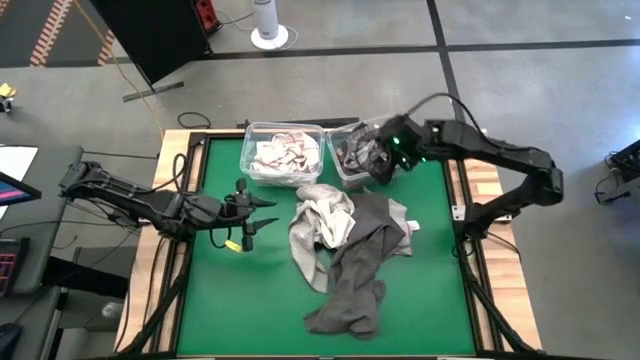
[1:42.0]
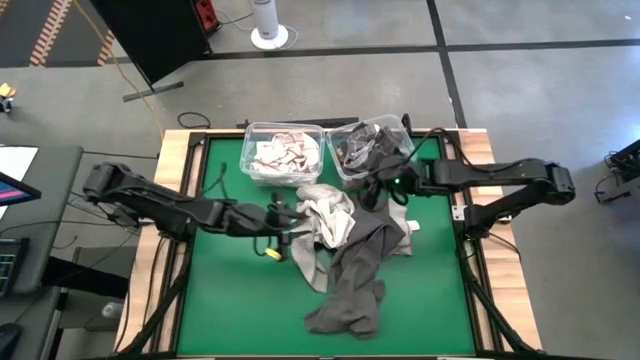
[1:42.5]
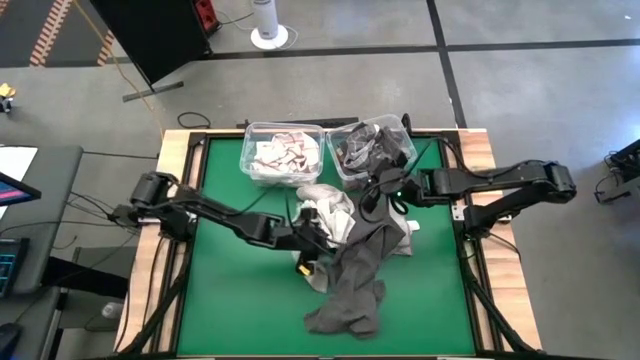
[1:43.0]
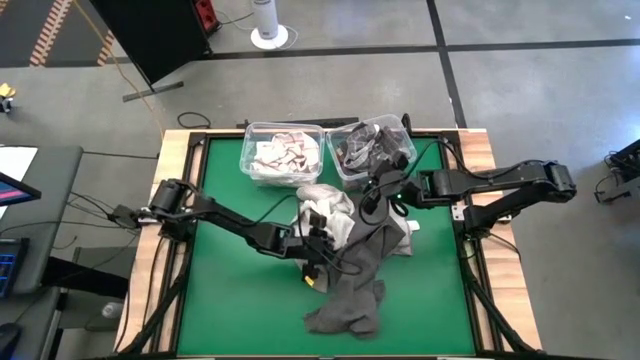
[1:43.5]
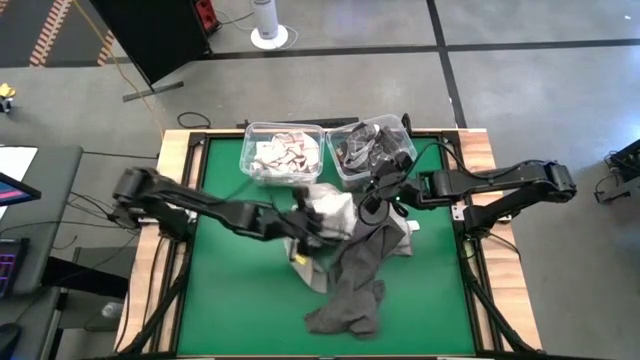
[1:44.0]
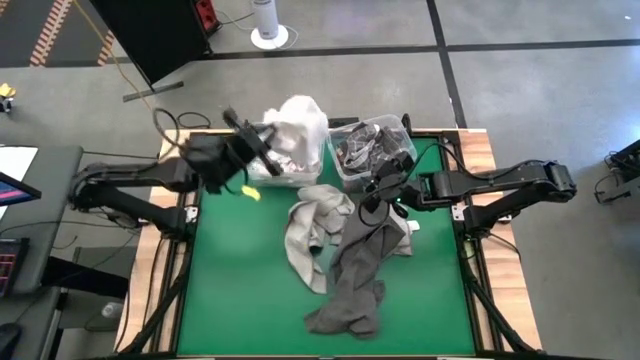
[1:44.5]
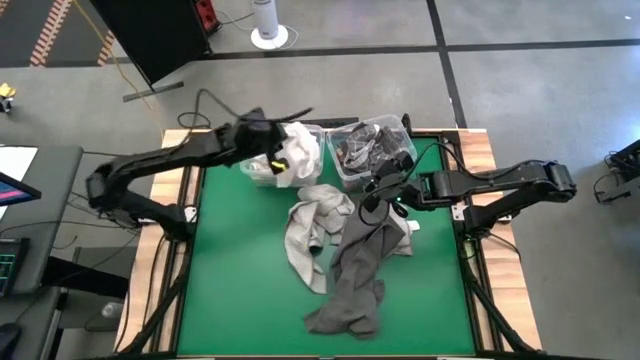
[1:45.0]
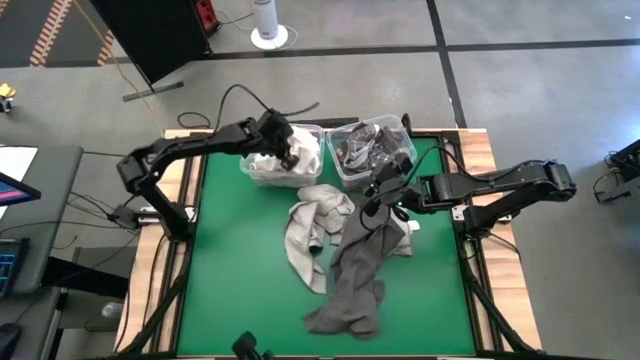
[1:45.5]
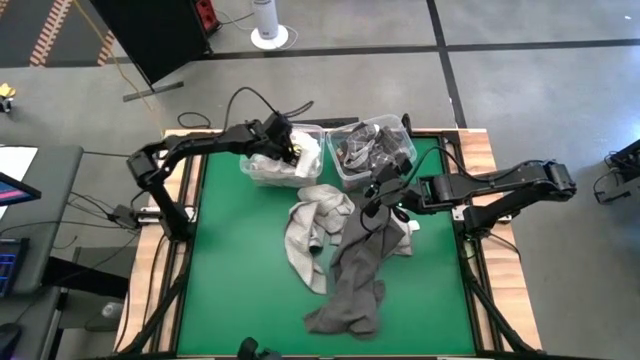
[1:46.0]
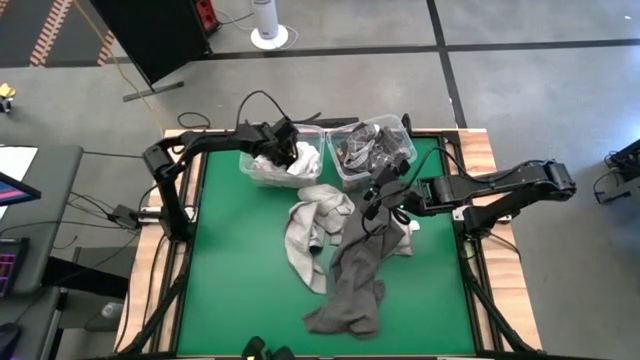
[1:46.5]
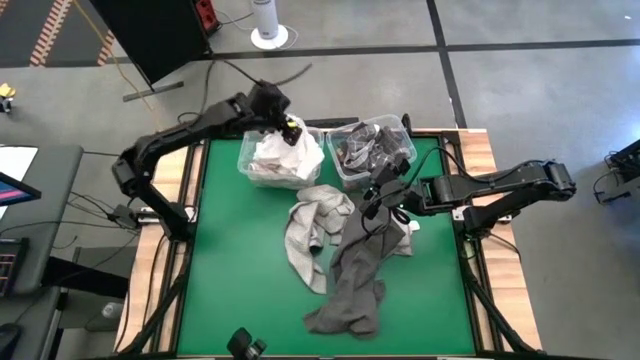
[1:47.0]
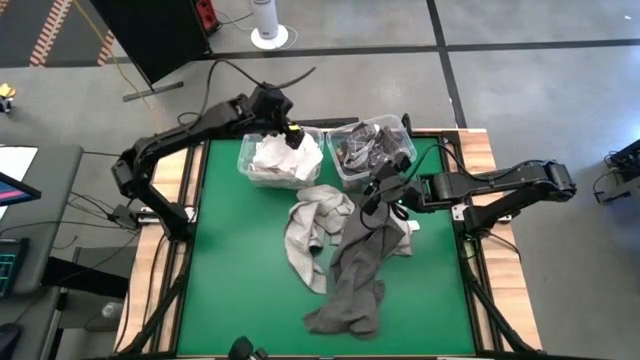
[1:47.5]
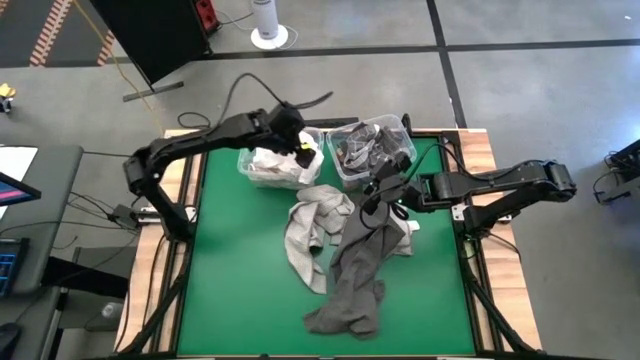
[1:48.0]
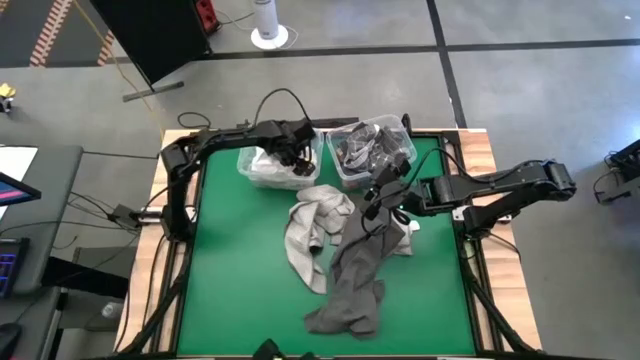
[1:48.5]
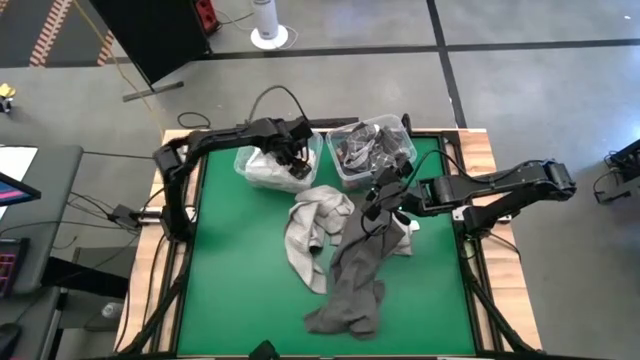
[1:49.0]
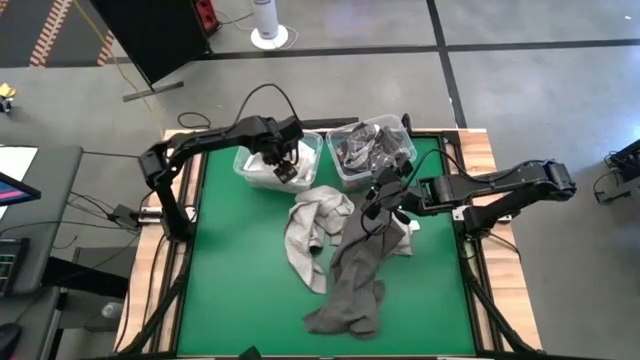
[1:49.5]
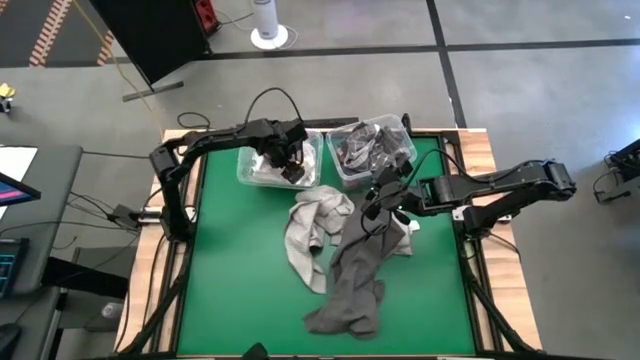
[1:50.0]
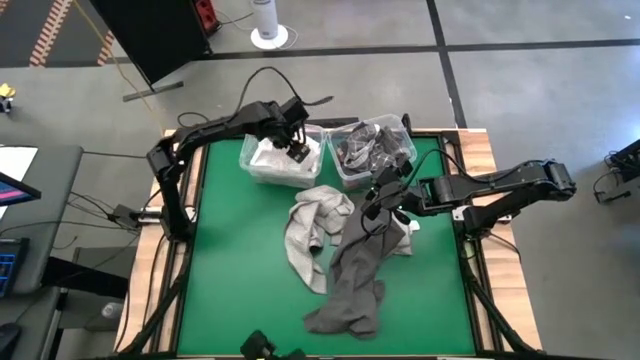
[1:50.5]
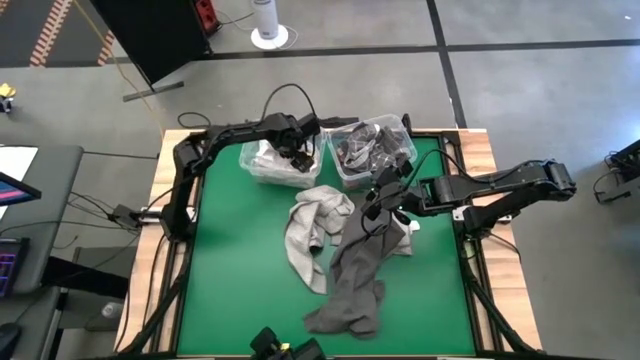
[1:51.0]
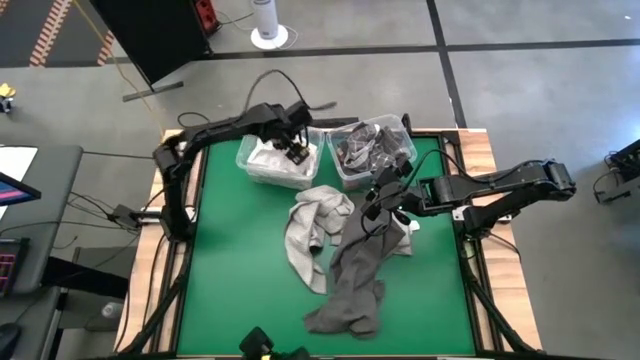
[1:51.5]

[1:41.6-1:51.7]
Task: Sort towels by color in basket
Put the white microfiber towel into the left transparent bin

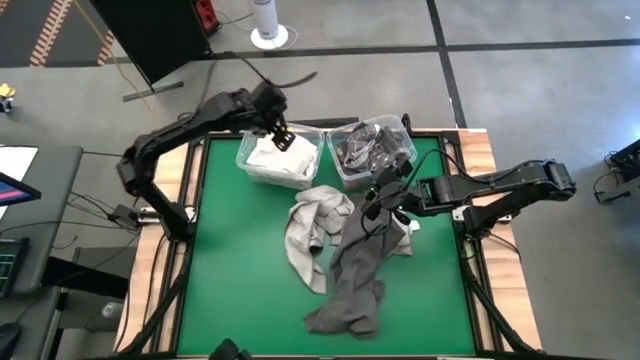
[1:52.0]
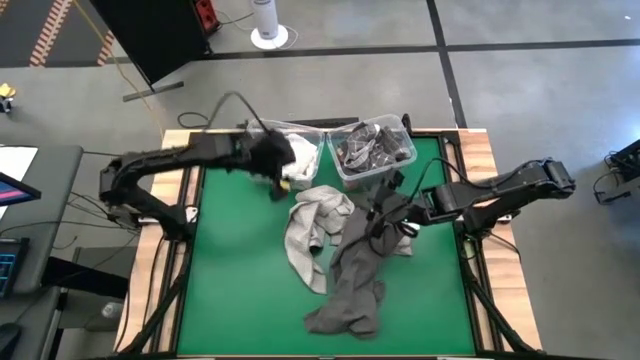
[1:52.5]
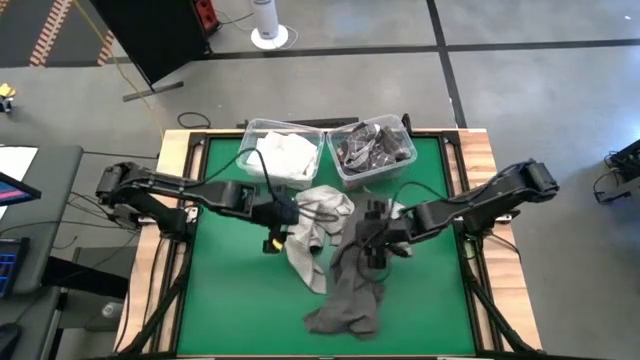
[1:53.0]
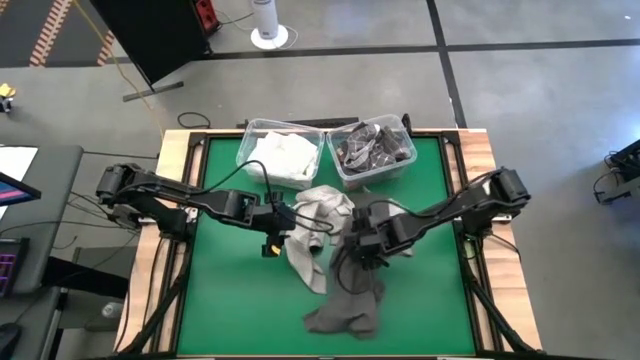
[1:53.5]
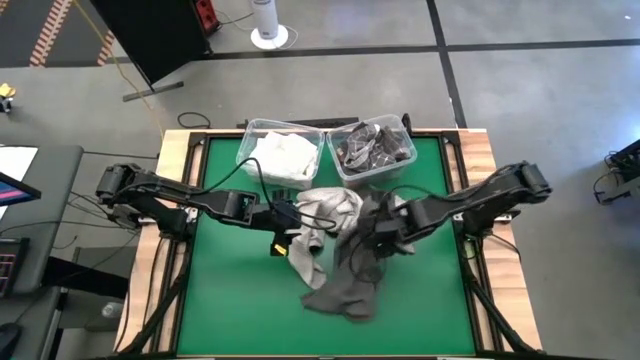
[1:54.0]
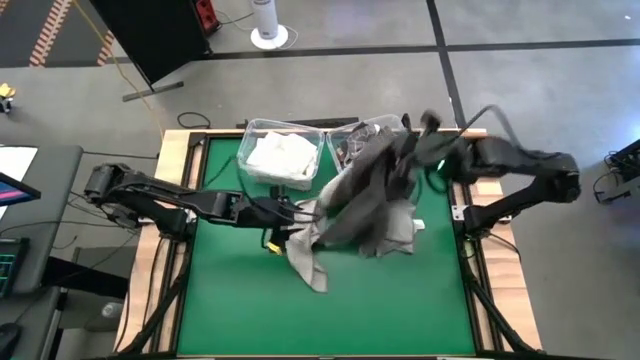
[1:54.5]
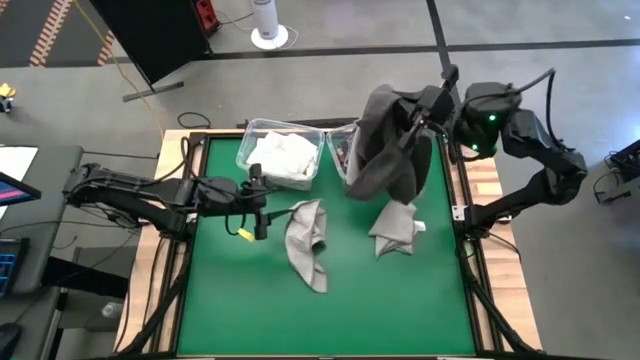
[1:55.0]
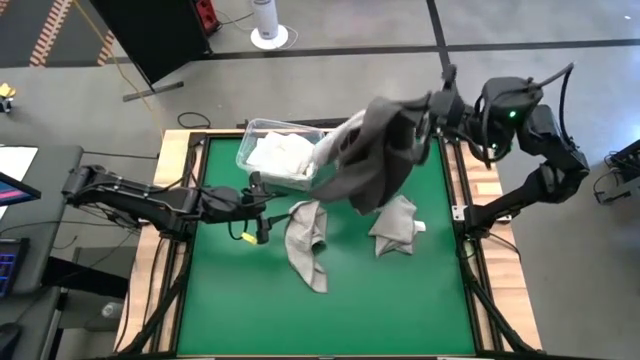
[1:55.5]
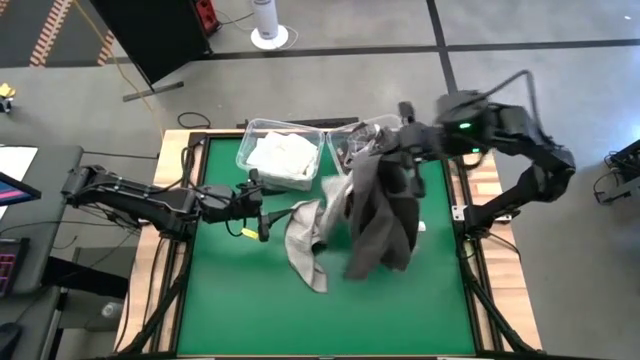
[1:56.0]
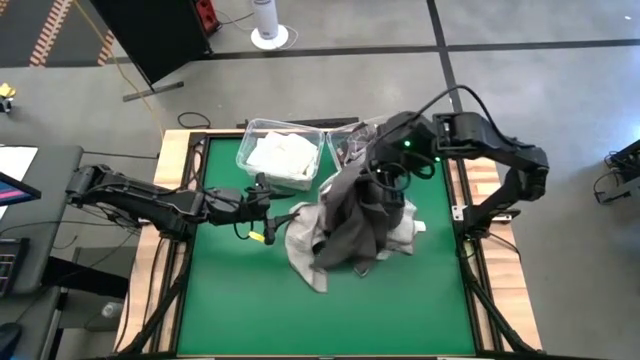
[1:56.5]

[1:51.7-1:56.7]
Put the black microfiber towel into the right transparent bin

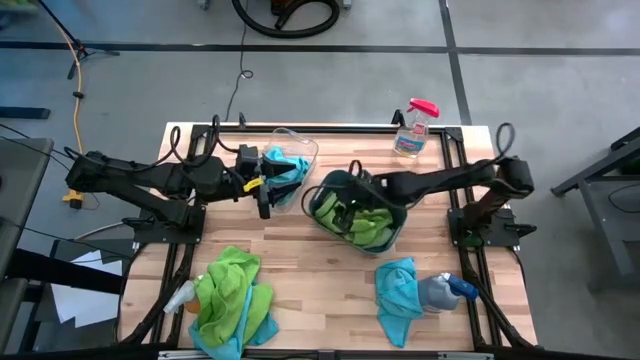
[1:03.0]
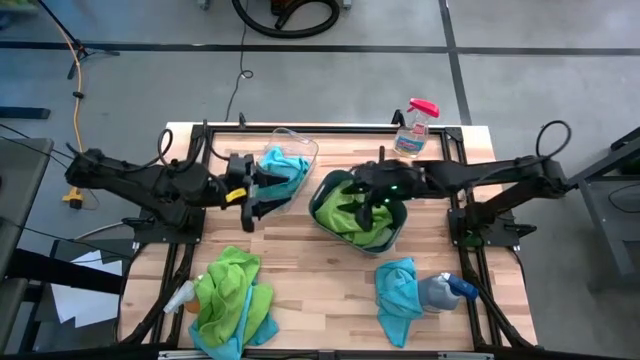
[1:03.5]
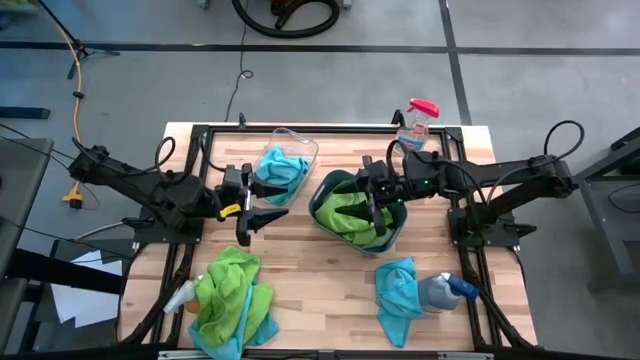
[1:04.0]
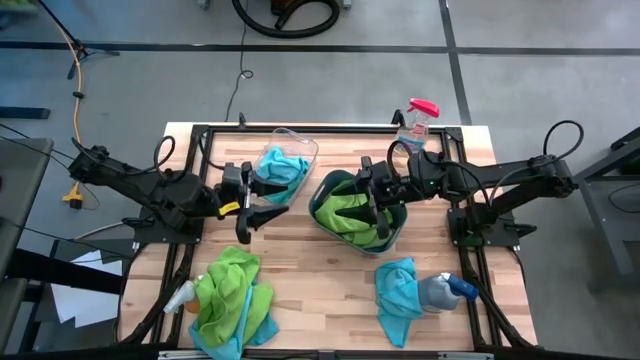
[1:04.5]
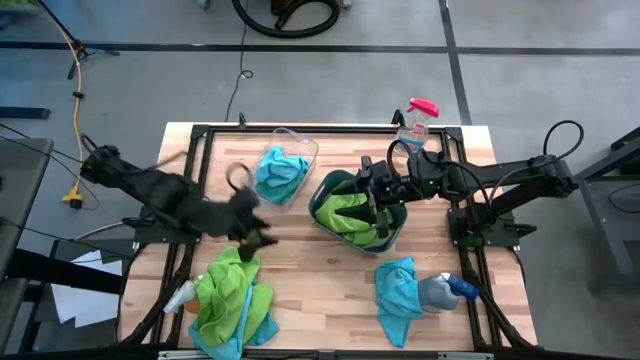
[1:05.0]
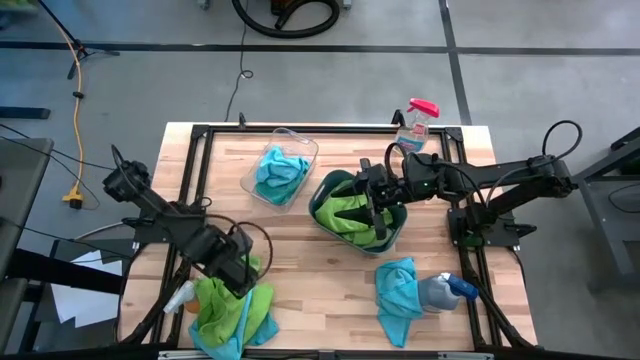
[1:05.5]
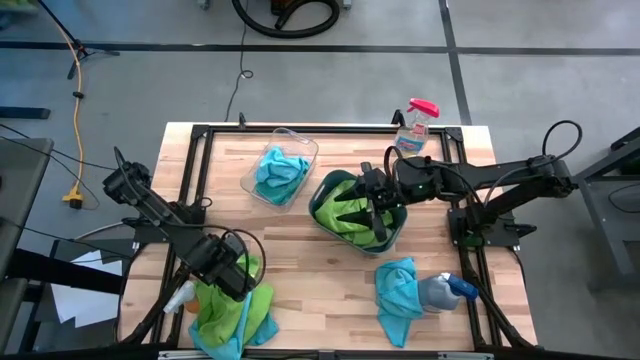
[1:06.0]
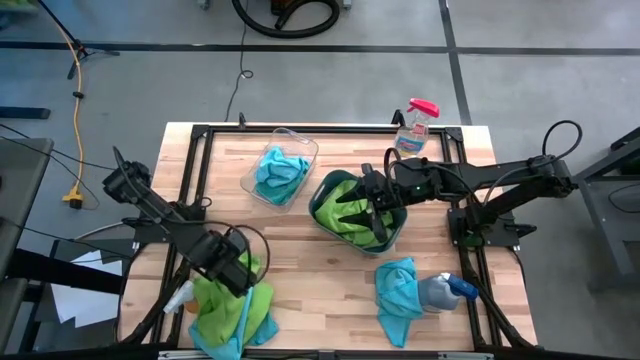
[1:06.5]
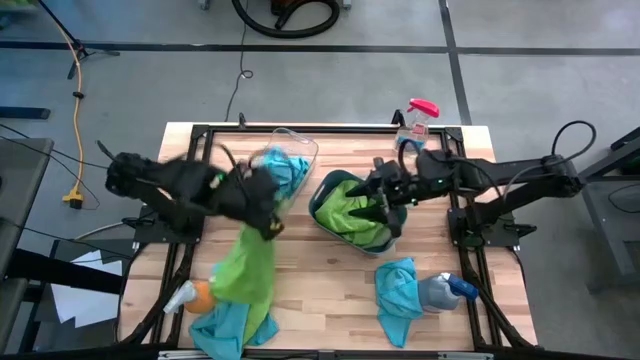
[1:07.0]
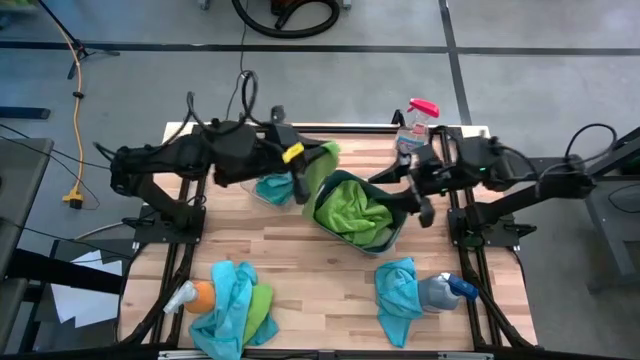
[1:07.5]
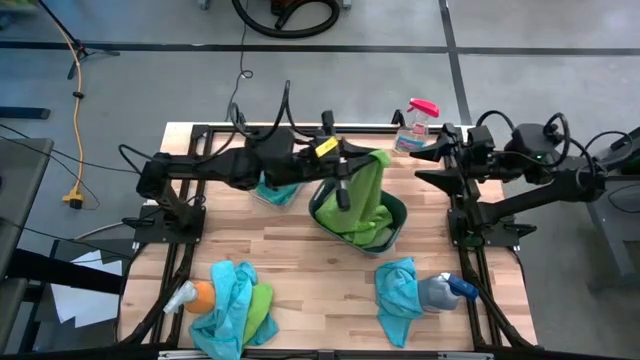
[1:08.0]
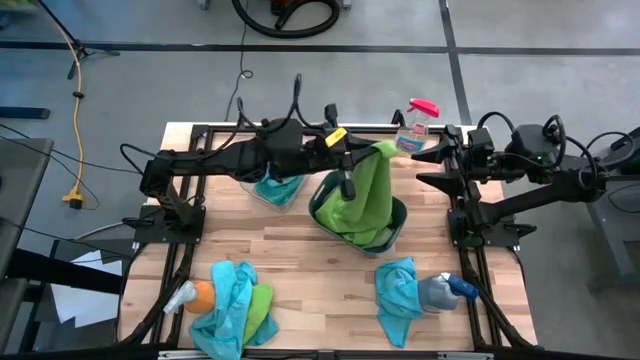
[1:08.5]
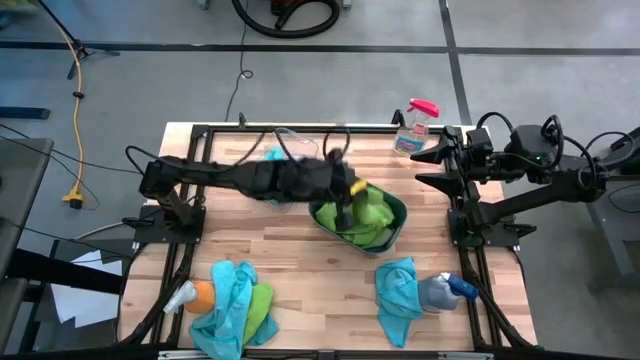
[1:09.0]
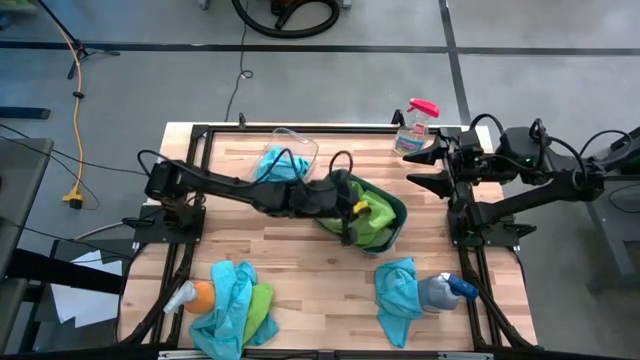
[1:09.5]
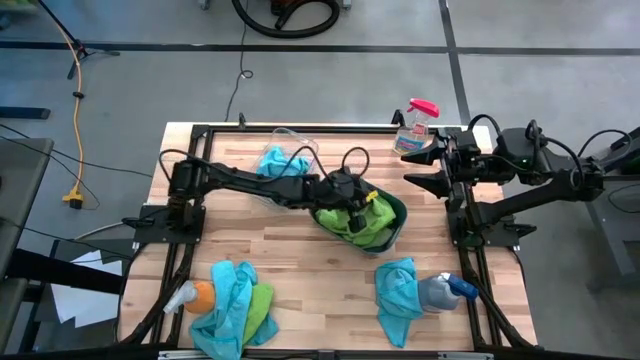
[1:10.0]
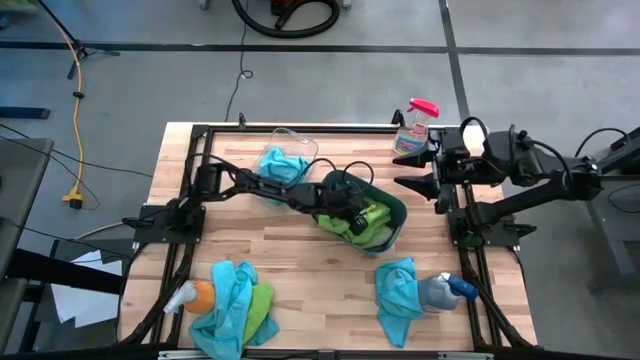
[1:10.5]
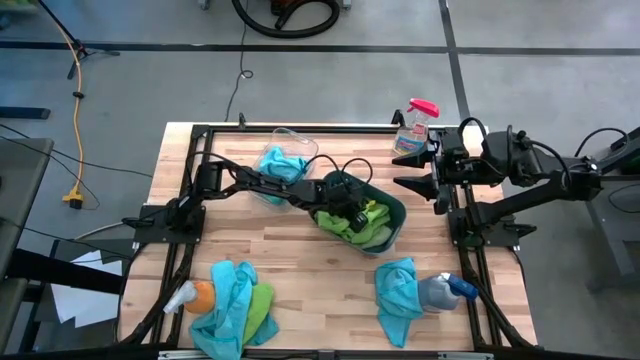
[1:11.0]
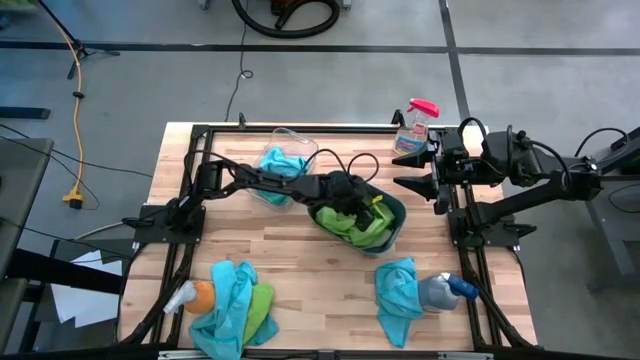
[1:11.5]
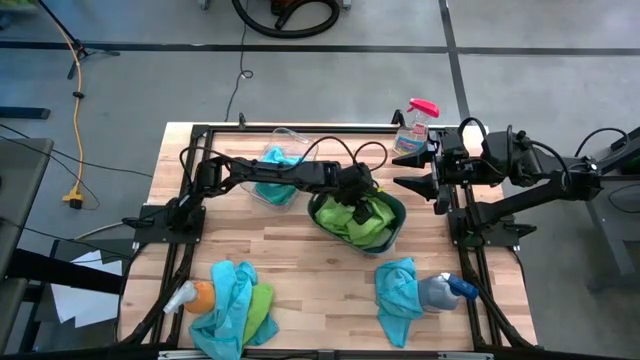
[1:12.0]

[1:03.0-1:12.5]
Task: Sort microfiber towel by color & place in baskets
Put the green microfiber towel into the blue bin
